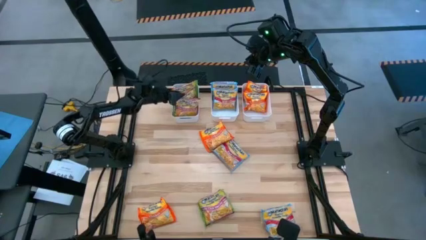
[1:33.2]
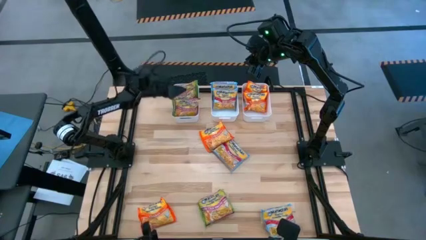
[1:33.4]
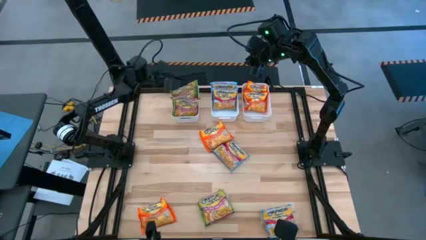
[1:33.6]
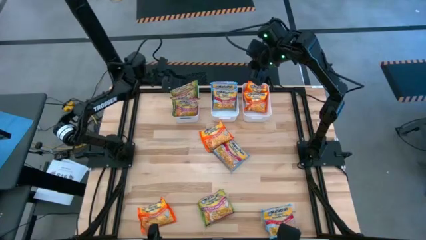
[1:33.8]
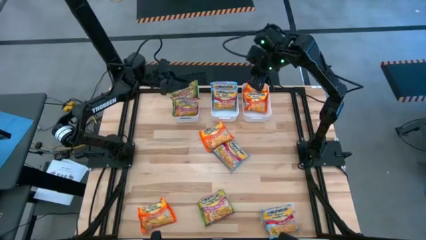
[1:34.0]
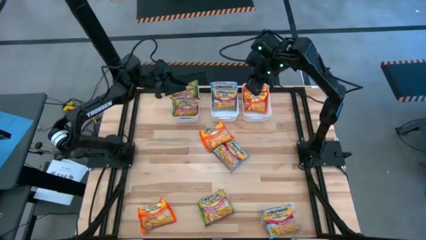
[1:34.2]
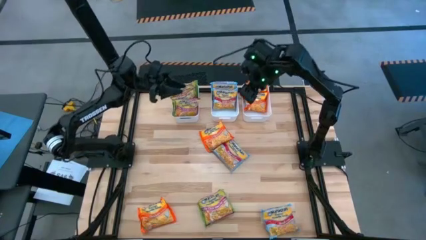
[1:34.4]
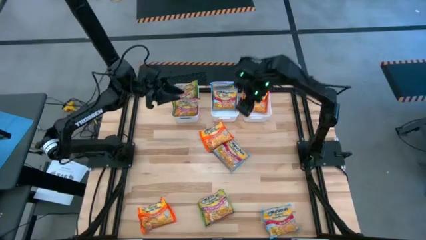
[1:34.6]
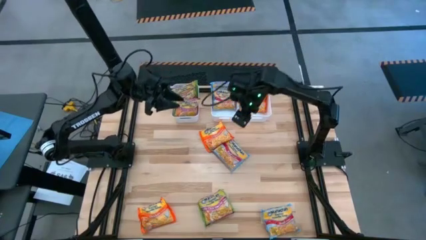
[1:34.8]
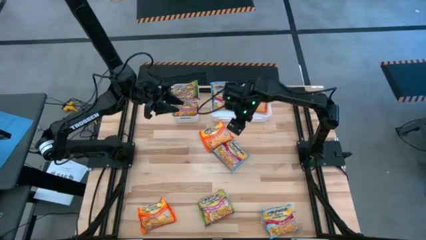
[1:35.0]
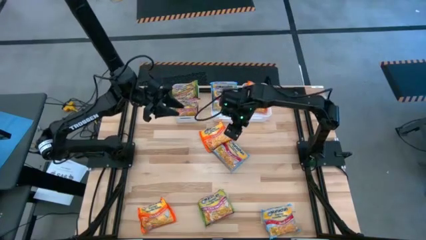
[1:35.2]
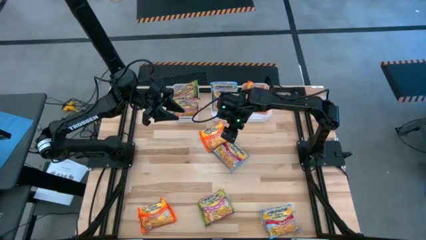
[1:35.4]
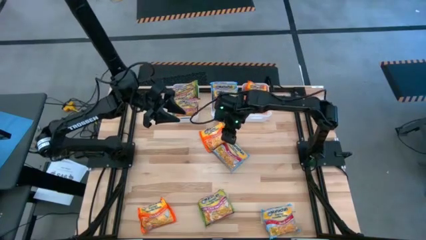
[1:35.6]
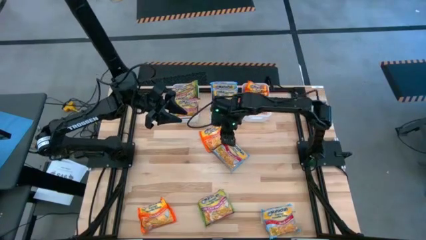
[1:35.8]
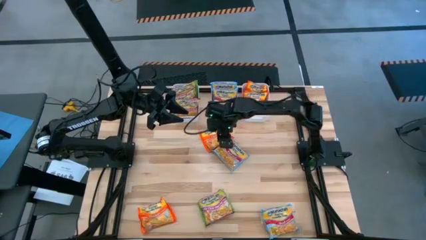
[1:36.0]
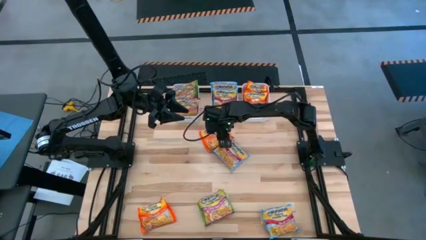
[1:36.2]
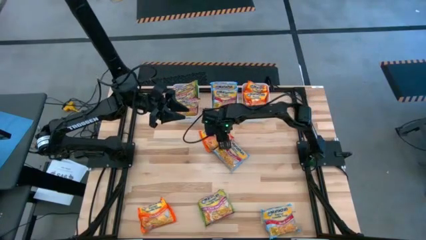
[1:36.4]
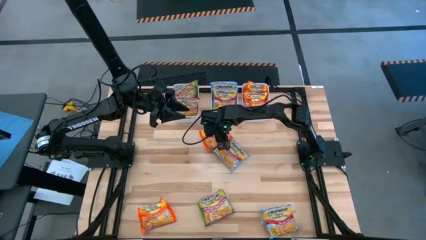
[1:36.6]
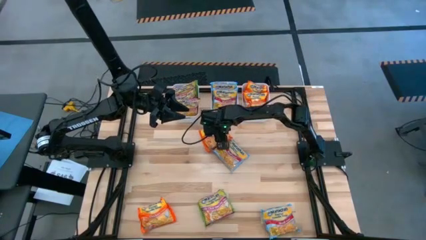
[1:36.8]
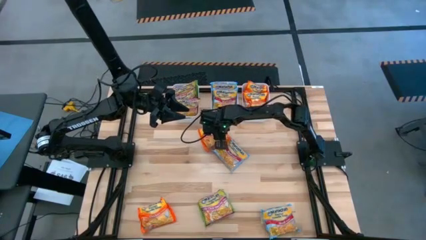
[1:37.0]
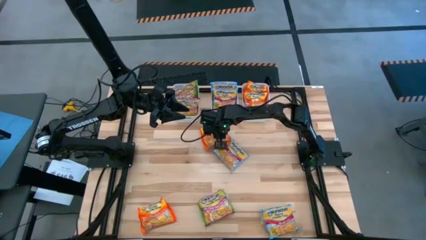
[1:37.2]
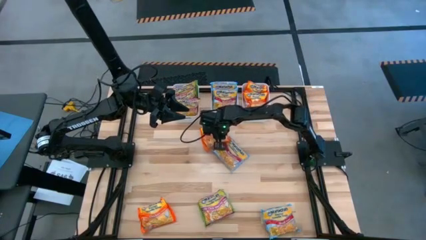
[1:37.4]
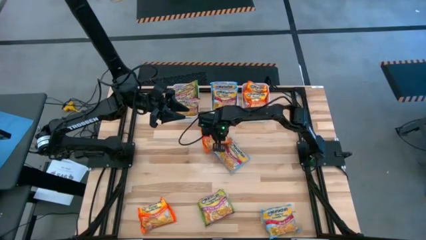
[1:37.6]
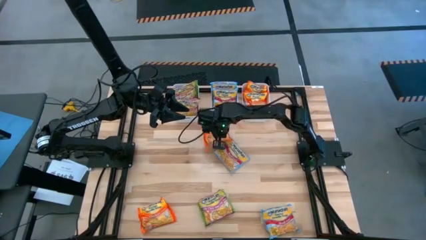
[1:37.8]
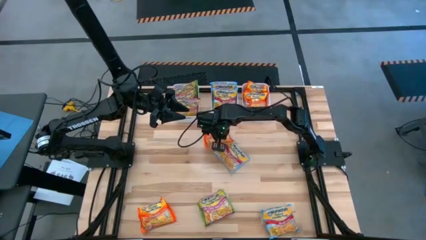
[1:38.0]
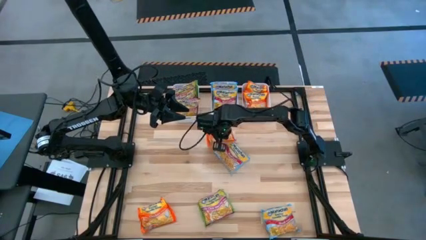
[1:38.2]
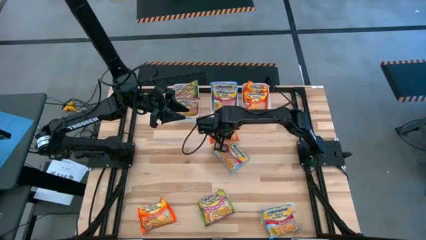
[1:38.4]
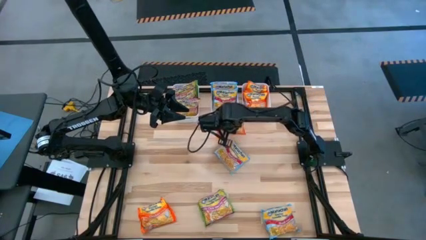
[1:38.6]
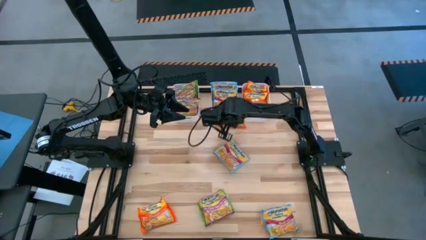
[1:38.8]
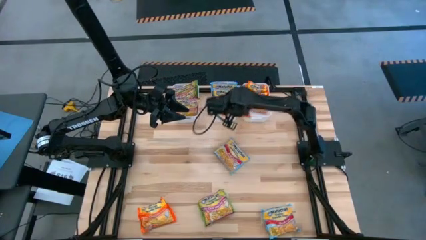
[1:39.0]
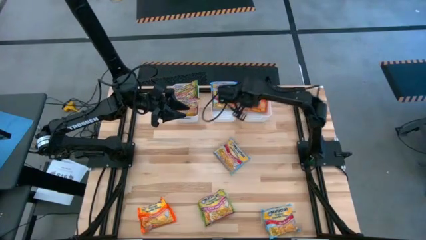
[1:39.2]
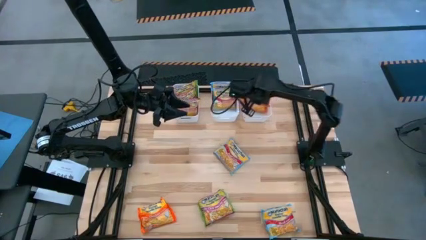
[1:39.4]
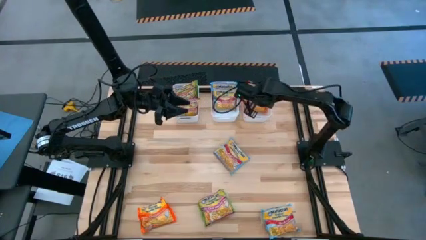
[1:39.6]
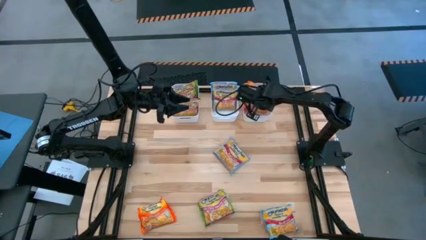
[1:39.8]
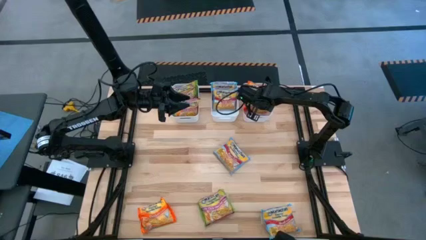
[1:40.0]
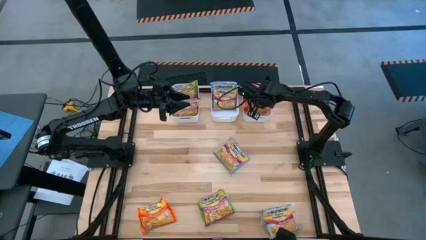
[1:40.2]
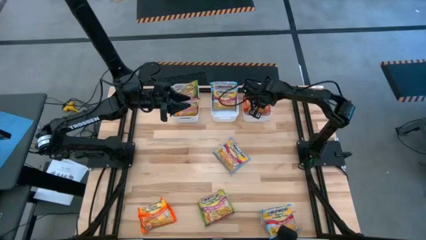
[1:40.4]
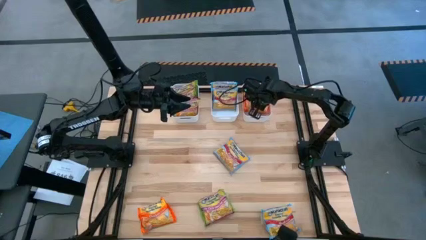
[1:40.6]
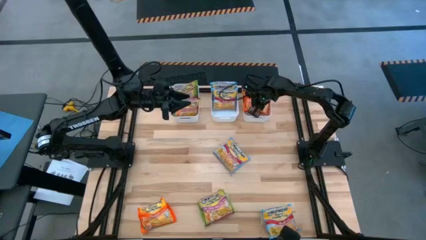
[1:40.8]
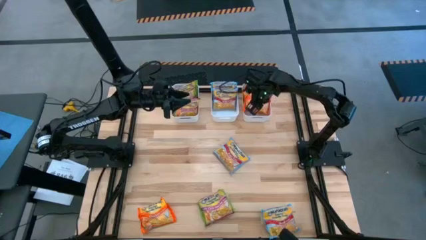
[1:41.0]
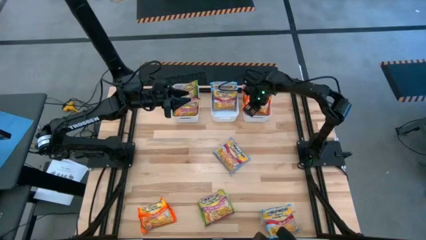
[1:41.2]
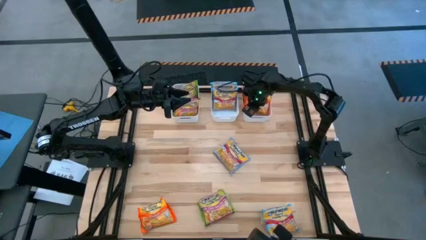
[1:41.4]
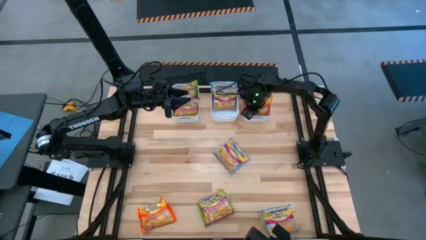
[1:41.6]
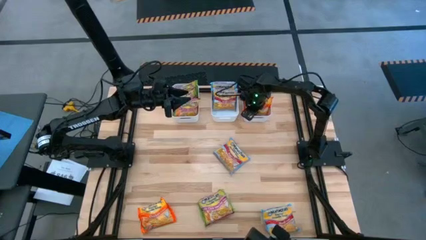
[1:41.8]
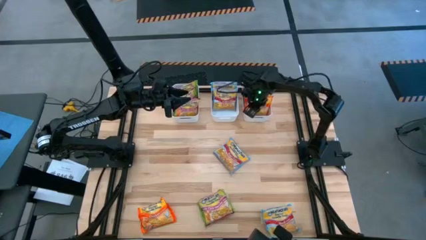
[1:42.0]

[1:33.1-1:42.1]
Task: Sort Maruchan noodles
Put the orange noodle pack into the right white bin

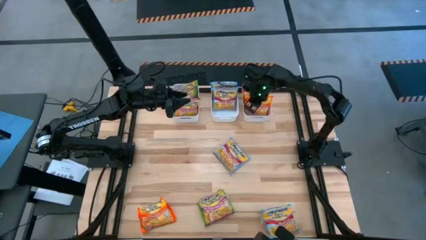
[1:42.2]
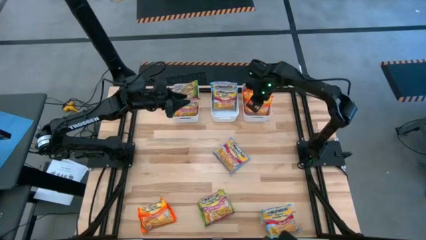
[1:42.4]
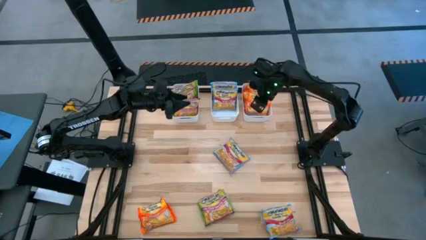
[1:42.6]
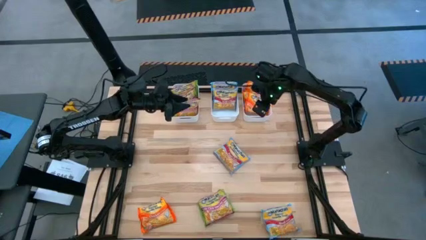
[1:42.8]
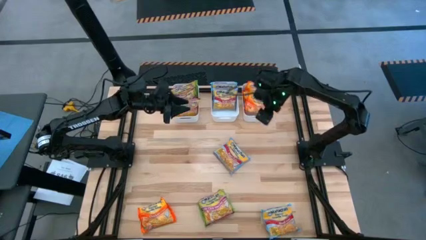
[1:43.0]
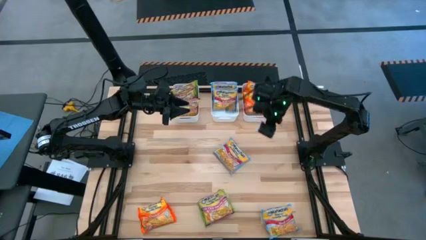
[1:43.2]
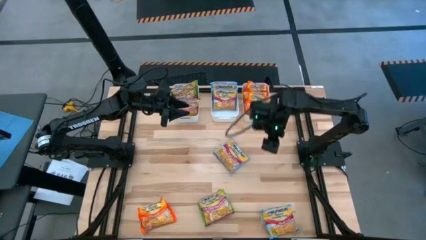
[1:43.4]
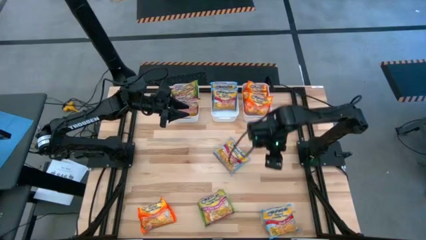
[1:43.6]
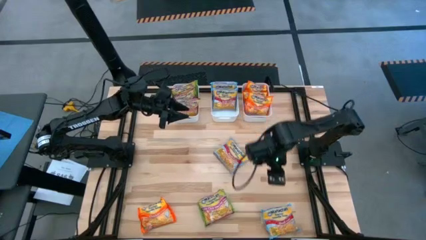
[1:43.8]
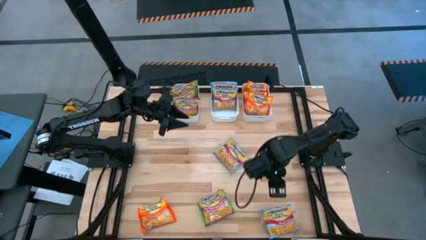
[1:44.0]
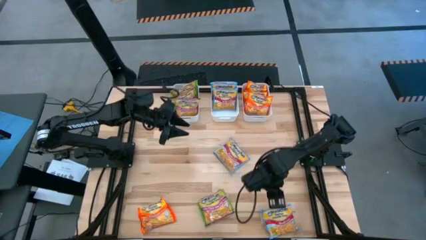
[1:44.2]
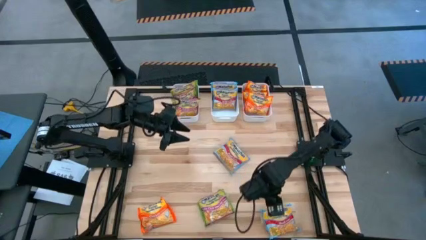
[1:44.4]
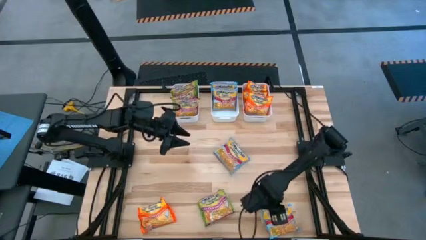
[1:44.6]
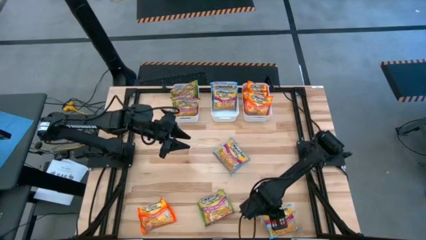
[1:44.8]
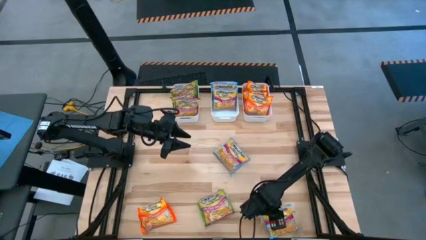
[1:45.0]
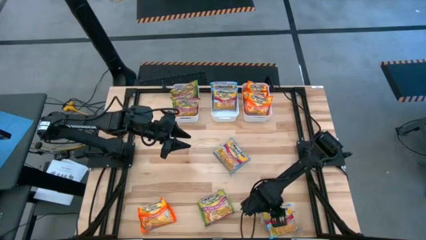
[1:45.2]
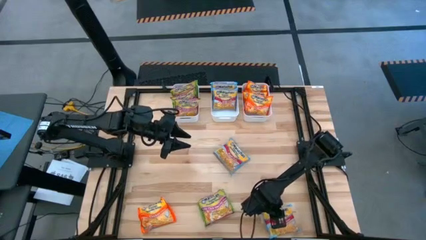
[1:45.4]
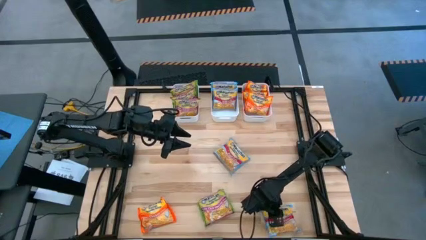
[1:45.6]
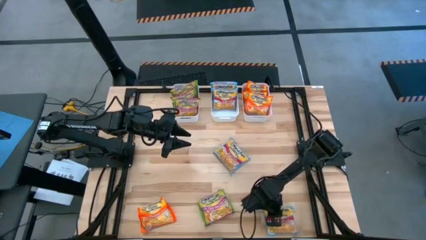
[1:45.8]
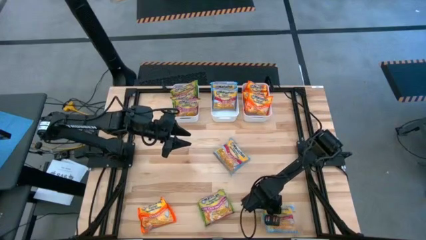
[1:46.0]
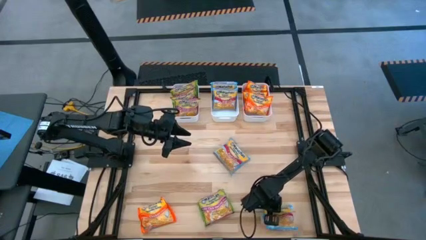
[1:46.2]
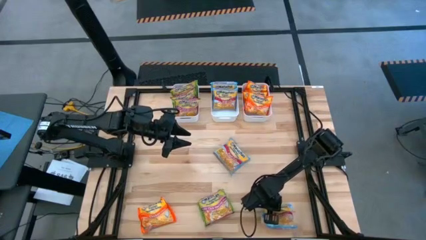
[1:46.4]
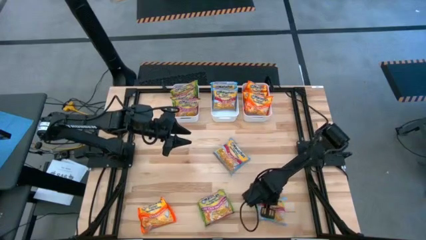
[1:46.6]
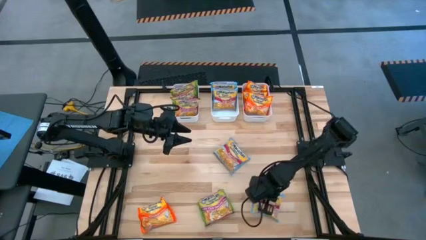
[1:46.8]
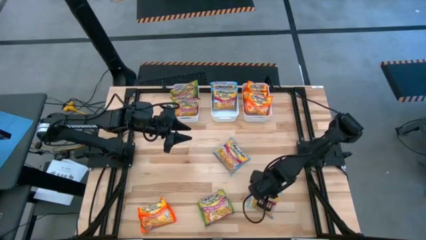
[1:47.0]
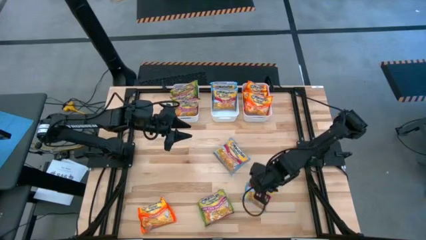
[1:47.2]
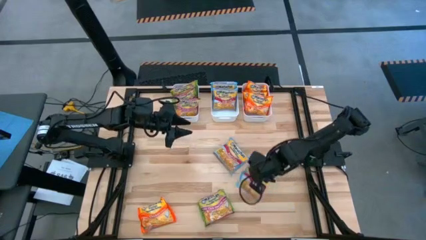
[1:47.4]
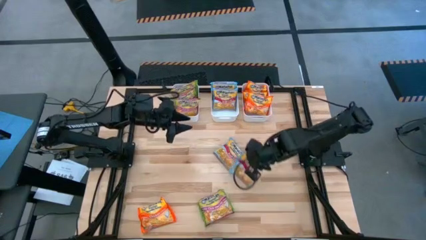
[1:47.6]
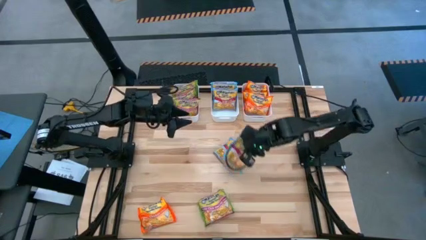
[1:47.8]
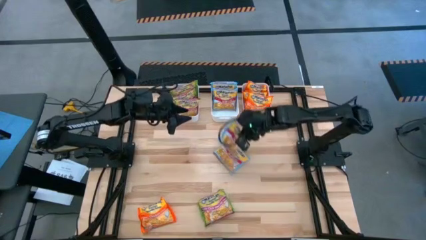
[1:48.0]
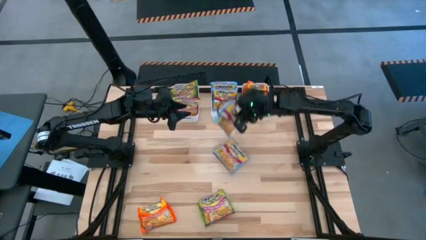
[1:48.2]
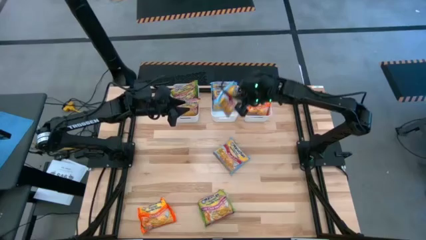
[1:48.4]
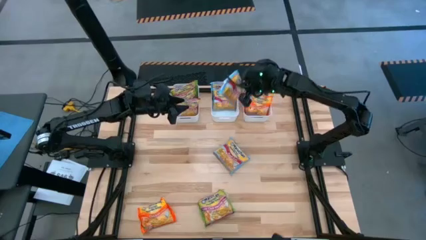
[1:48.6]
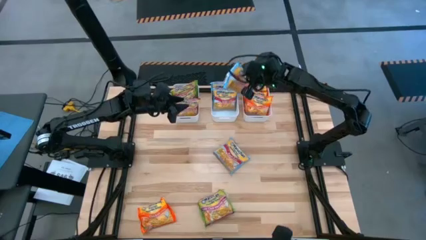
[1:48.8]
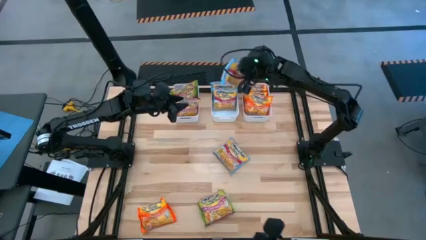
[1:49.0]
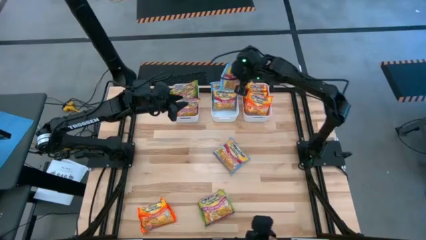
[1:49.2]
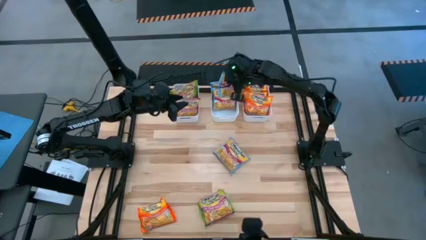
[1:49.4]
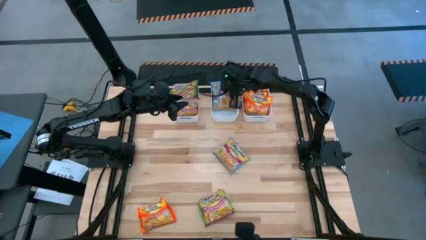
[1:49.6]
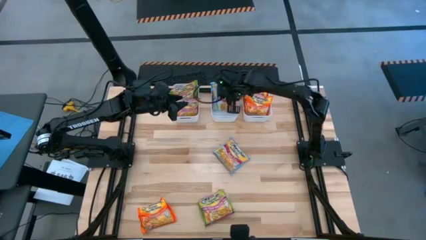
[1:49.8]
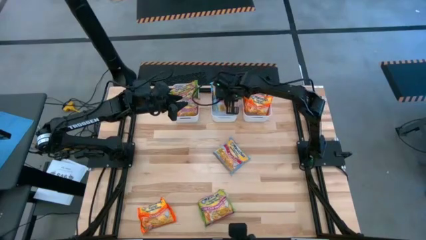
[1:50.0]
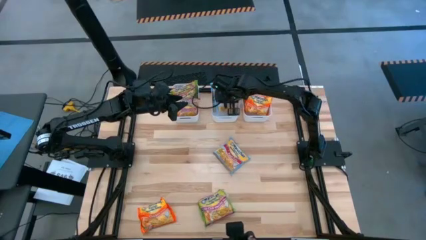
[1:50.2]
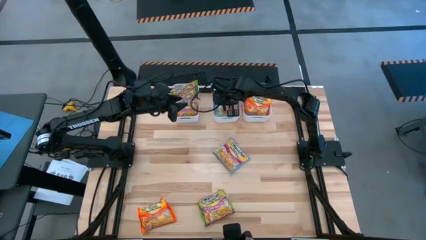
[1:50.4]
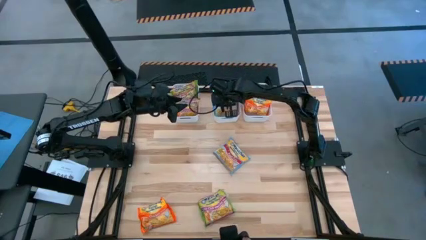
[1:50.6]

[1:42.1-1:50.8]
Put the blue noodle pack into the middle white bin
